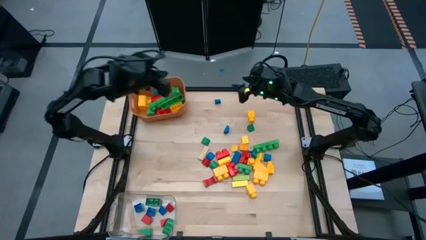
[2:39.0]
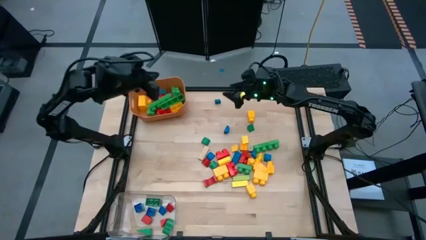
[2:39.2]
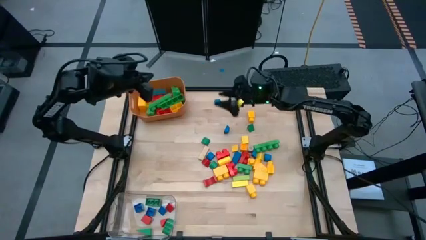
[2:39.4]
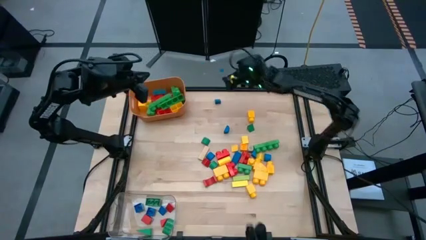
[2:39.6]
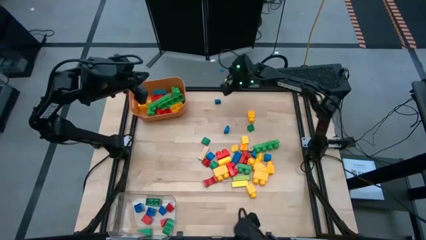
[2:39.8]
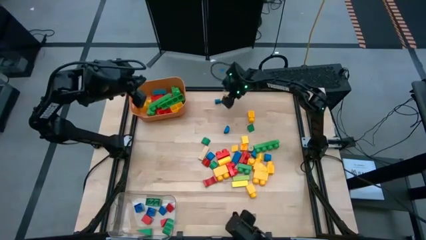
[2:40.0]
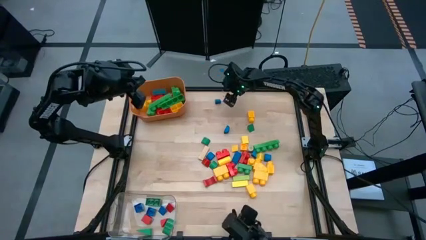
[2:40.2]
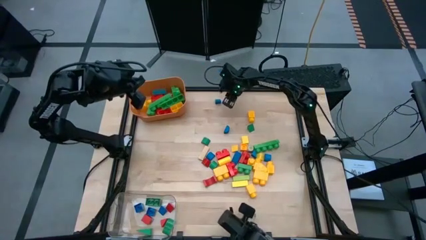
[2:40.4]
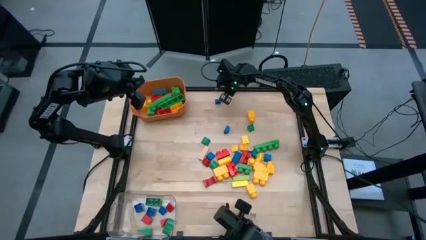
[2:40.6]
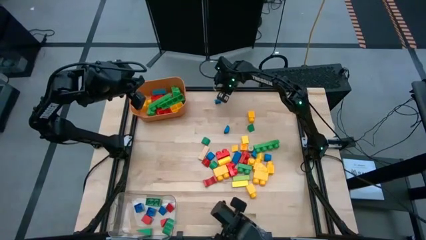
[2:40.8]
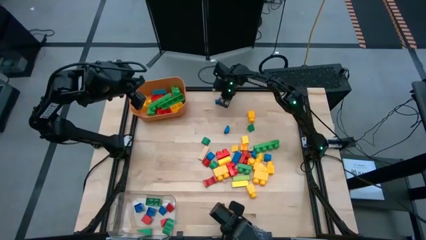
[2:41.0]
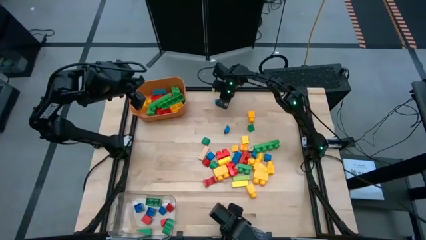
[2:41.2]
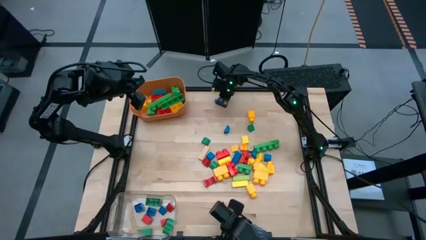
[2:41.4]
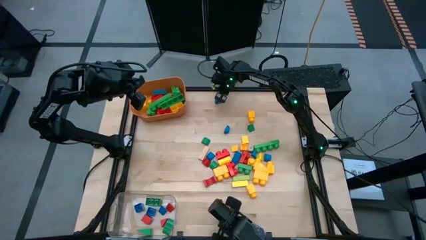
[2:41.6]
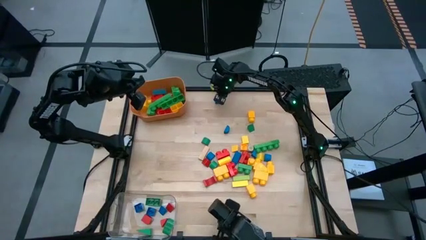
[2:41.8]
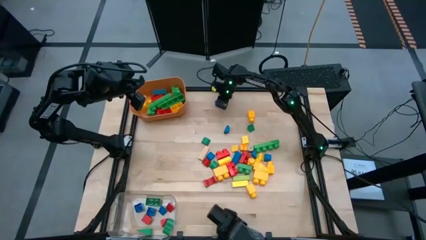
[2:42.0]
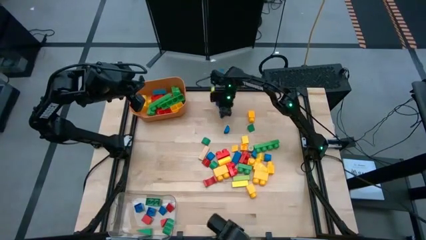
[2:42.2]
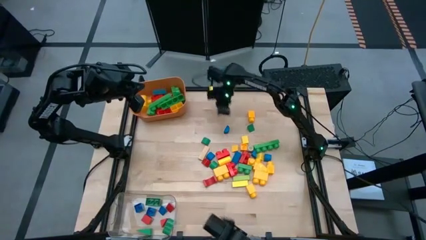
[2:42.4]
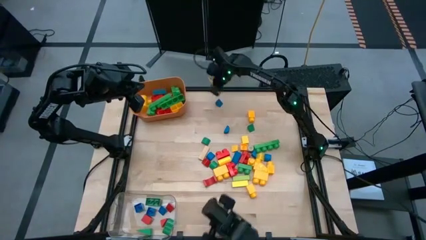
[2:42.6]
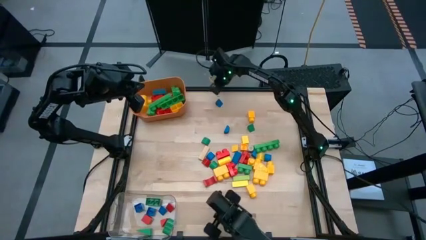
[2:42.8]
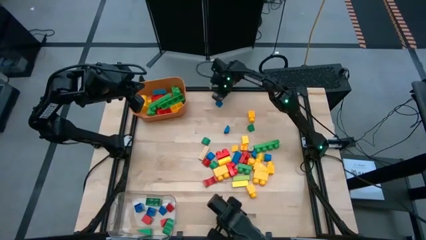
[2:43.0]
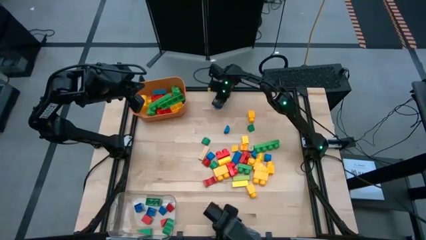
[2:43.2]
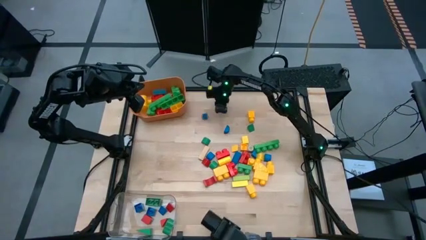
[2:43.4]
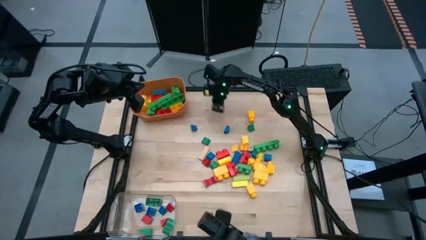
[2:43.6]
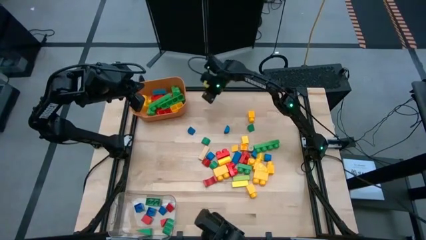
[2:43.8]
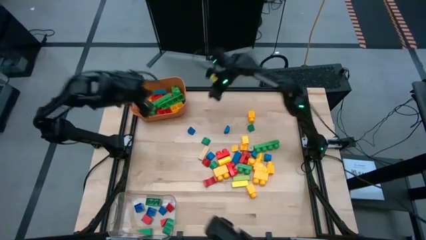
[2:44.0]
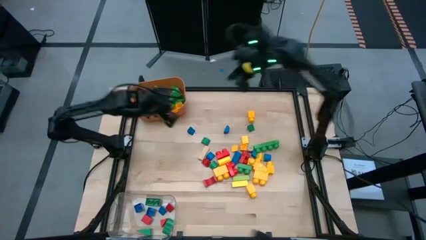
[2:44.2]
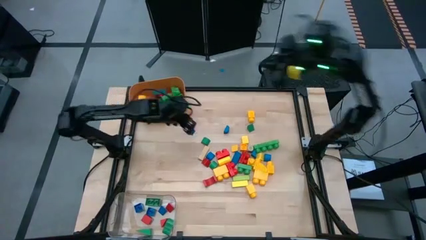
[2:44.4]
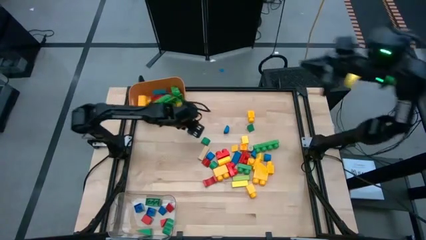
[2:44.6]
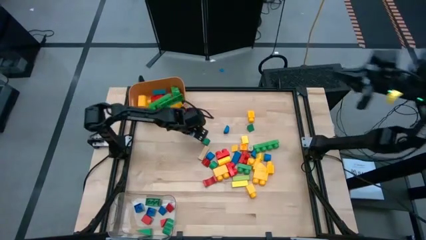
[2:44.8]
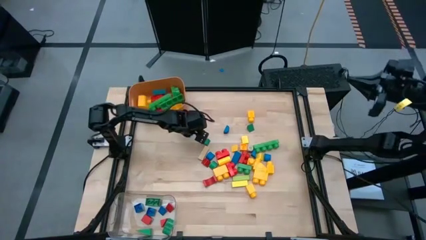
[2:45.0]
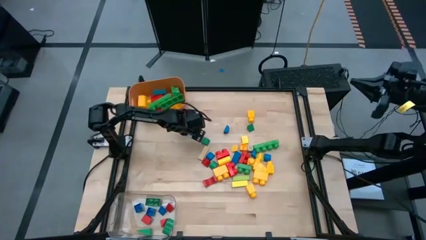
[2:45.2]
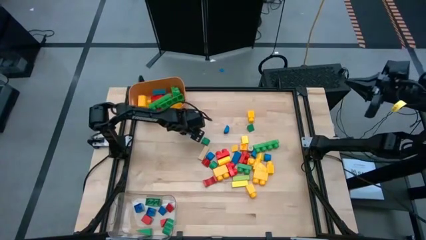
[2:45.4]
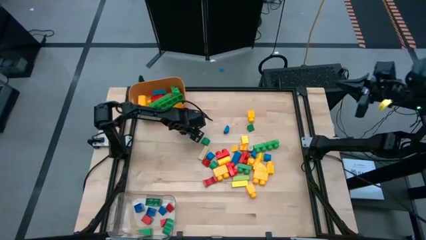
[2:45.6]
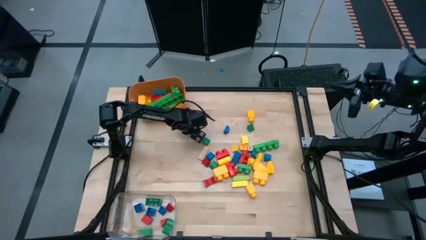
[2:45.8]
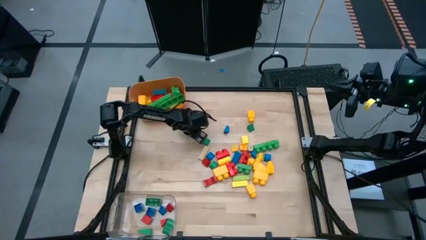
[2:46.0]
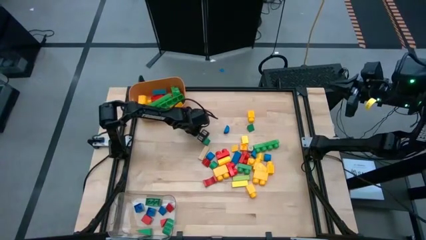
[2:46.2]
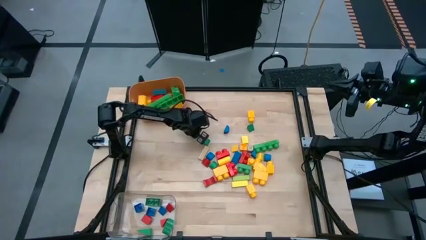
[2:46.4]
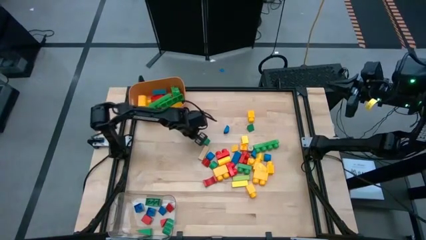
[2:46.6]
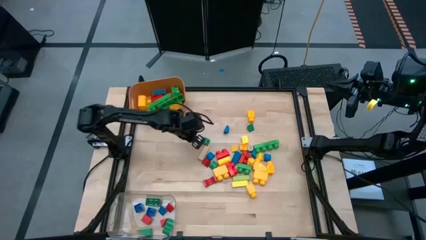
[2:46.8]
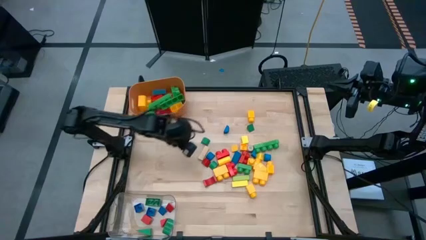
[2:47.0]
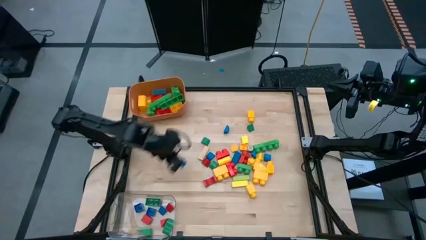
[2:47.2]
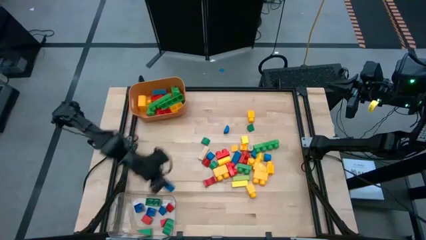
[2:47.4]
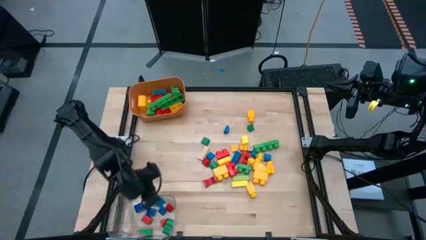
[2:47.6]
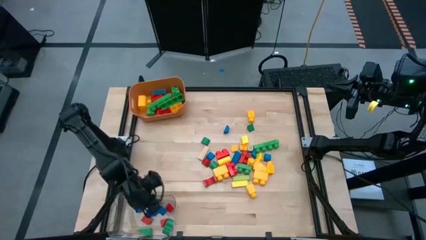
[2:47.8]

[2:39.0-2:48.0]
Task: Sort blocks by size
Put the small blue block into the transparent bin

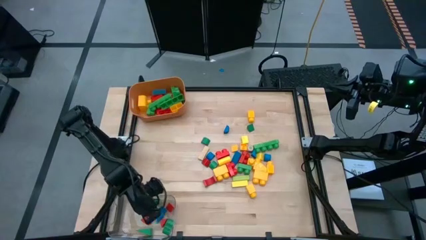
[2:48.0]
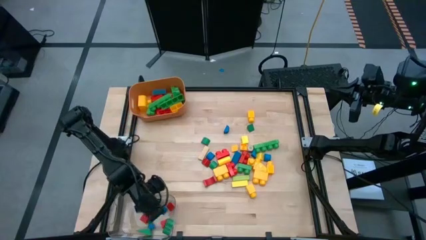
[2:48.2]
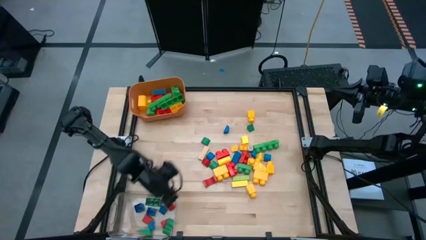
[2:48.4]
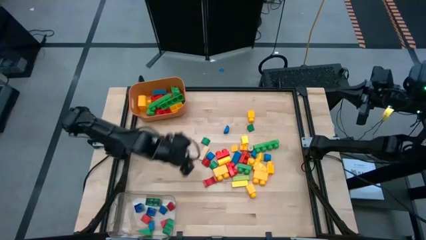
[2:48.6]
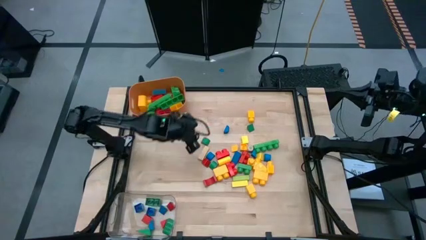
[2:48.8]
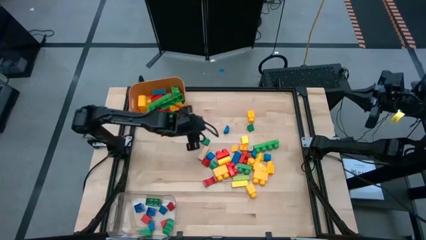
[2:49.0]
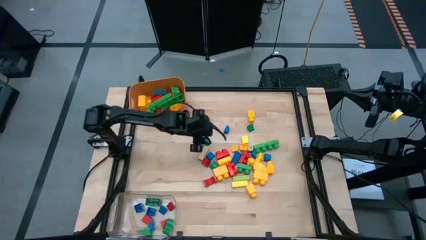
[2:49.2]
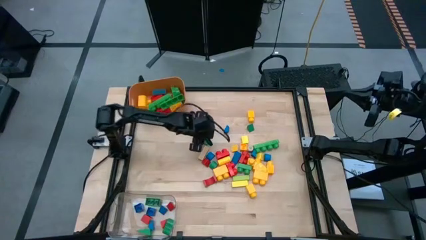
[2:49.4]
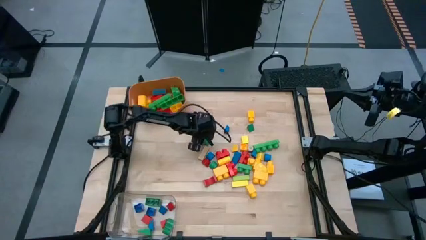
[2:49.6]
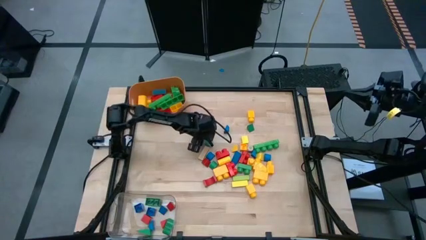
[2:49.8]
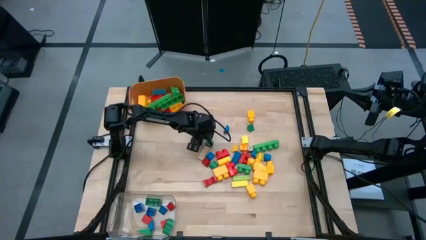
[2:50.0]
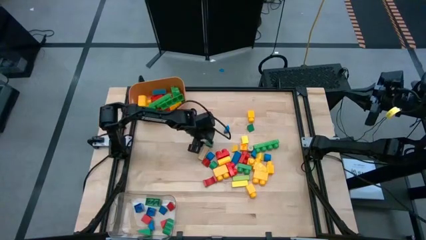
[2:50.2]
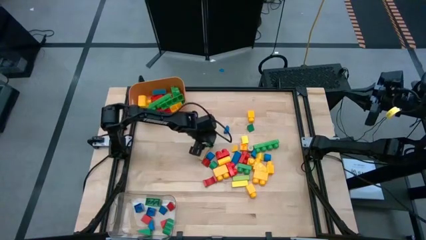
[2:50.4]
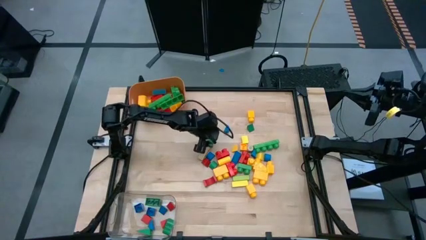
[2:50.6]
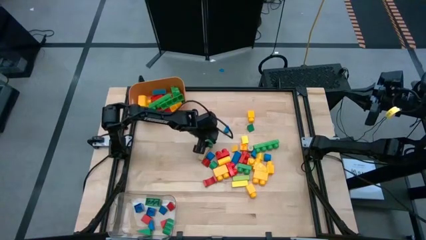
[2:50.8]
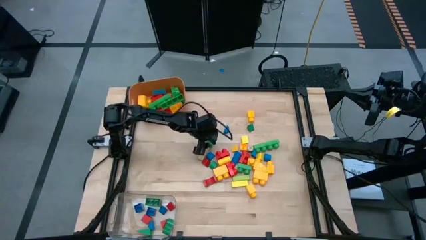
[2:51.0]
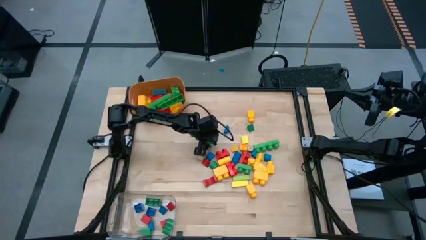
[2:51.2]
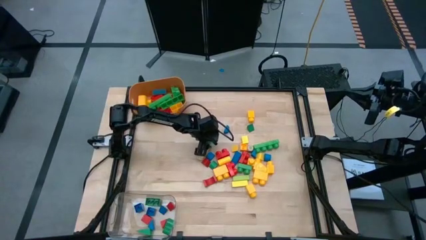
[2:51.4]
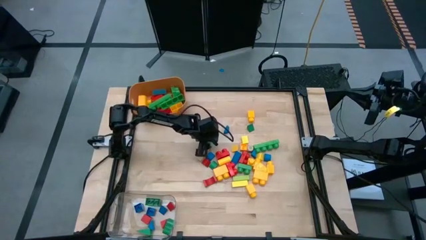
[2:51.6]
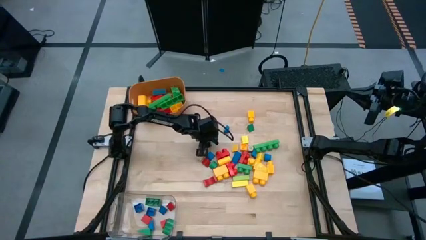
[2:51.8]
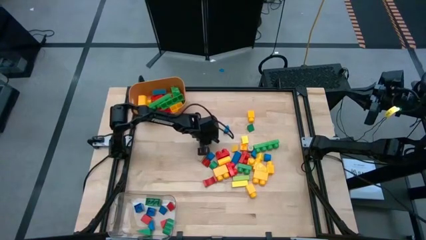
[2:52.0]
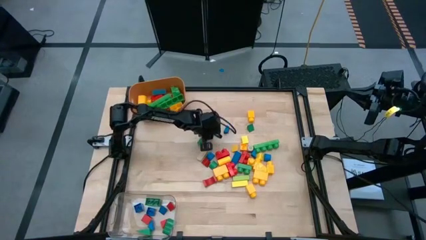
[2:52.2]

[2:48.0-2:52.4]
Put the small green block into the transparent bin

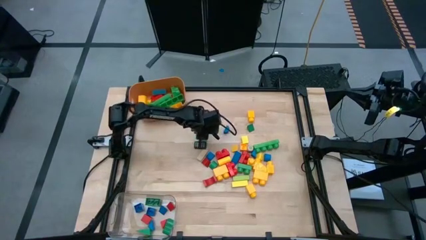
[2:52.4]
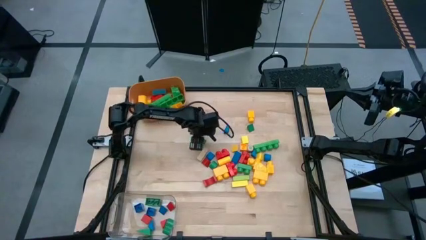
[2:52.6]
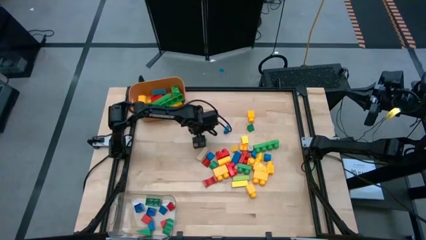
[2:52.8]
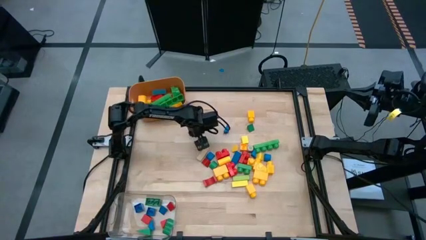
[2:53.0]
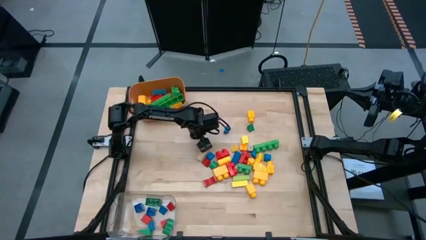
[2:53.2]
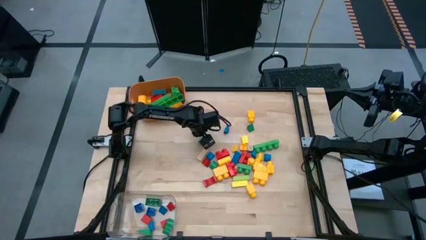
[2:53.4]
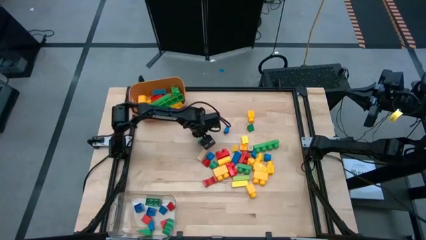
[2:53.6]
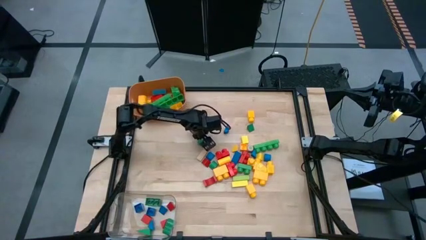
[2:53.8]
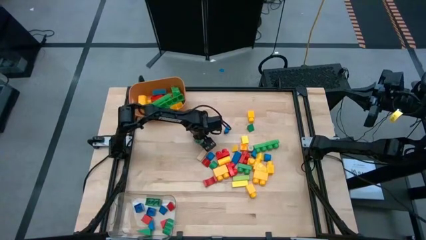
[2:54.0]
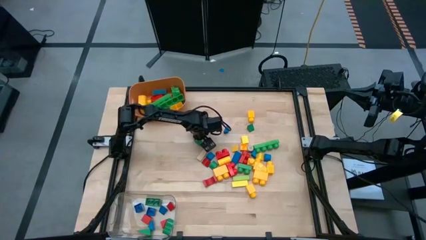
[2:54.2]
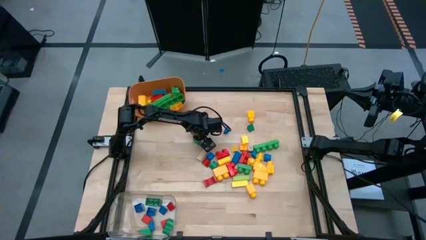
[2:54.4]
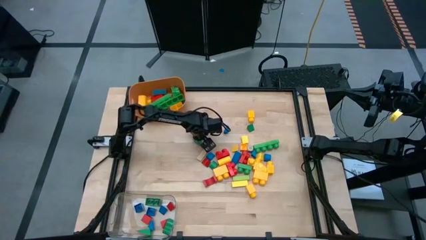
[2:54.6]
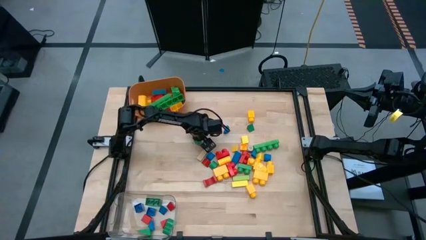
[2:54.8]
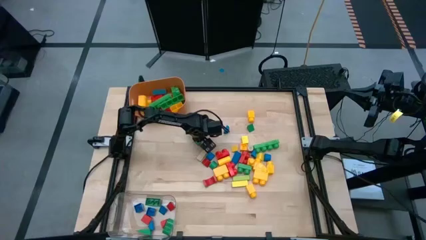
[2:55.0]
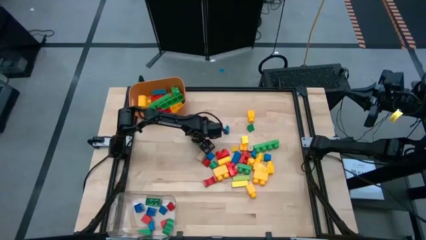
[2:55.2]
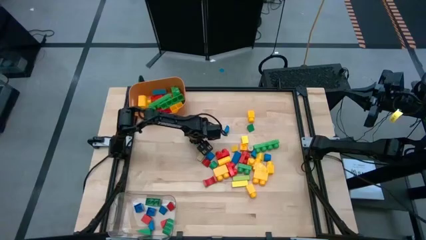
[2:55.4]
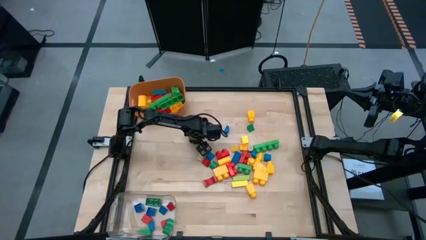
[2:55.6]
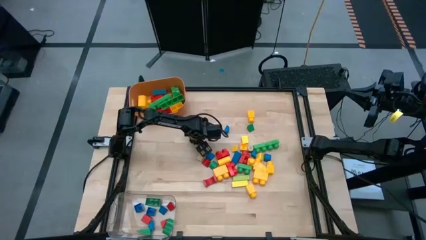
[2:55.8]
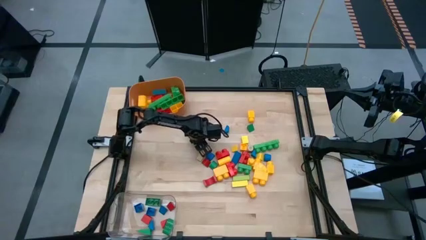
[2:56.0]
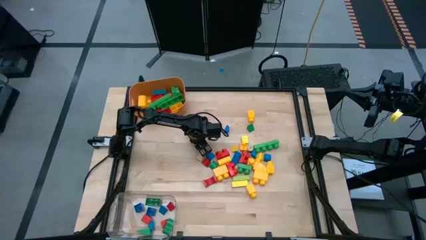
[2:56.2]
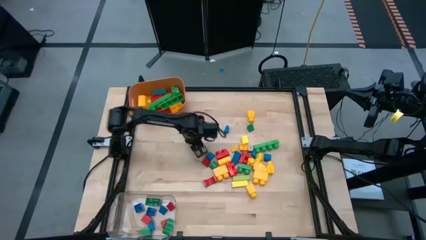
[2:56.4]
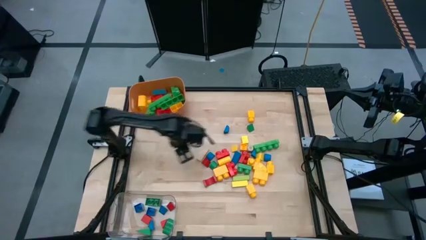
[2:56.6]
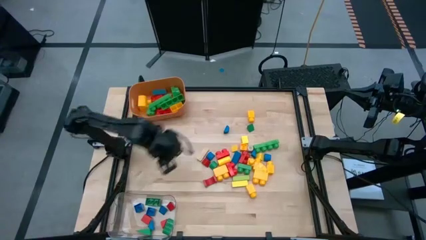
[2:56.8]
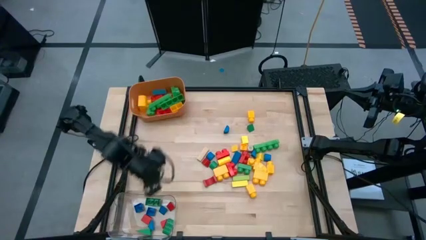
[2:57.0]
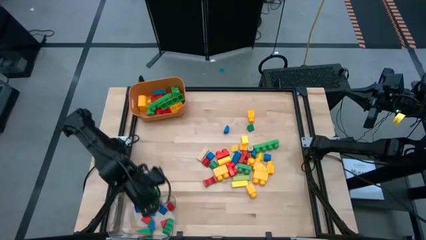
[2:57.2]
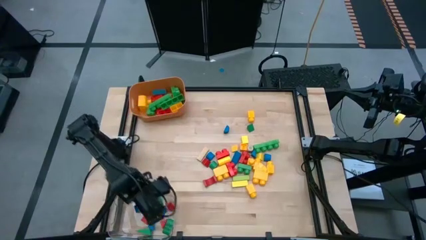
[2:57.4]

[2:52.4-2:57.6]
Put the small green block into the transparent bin
